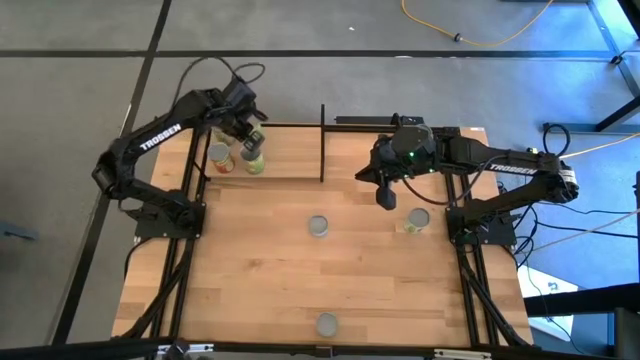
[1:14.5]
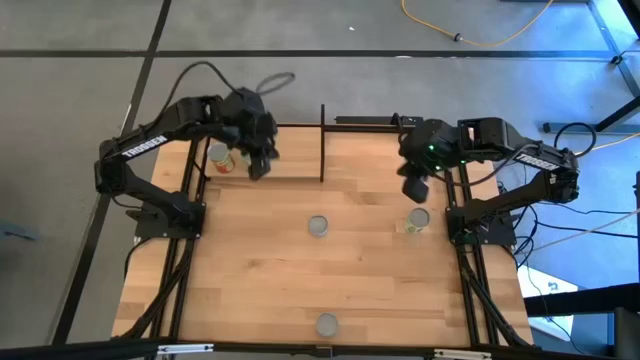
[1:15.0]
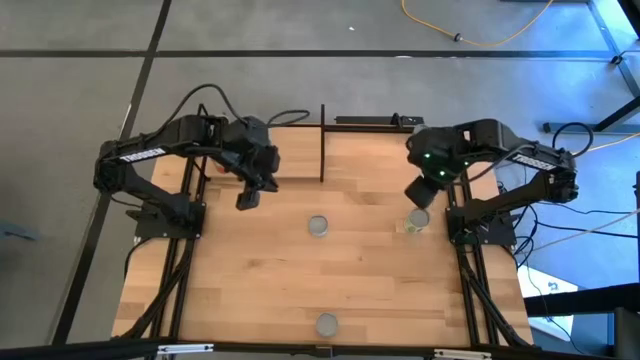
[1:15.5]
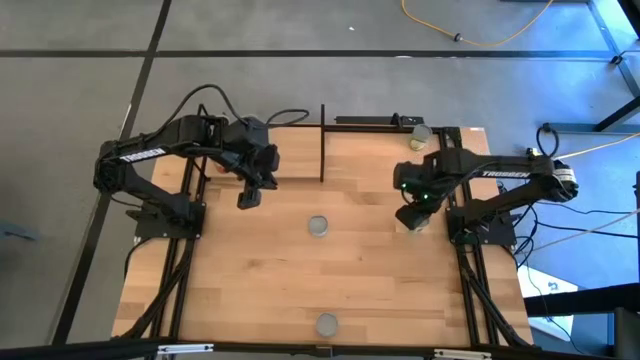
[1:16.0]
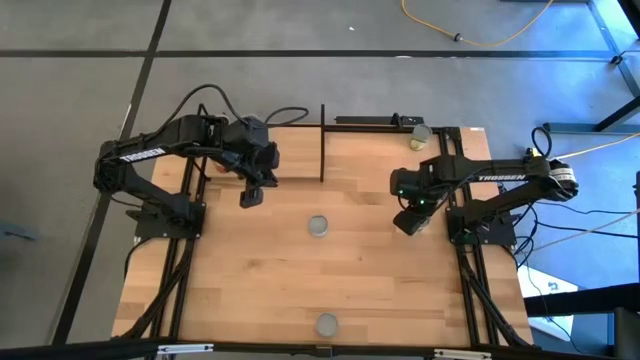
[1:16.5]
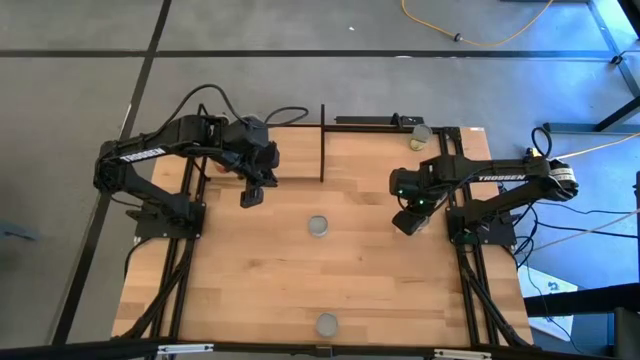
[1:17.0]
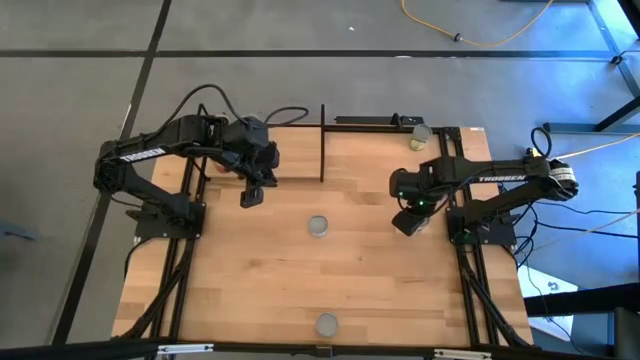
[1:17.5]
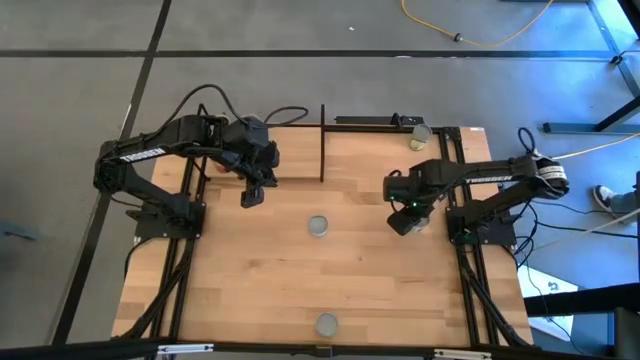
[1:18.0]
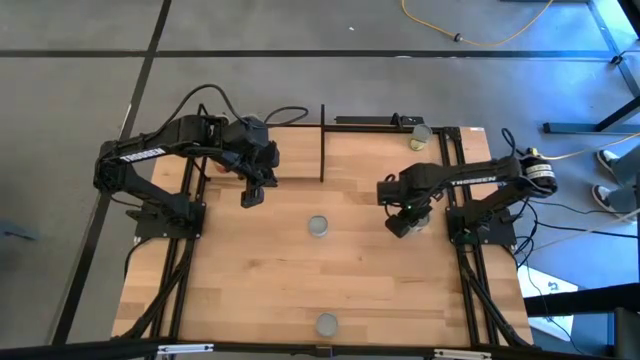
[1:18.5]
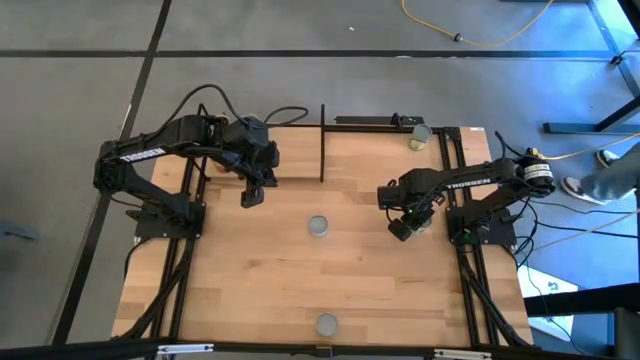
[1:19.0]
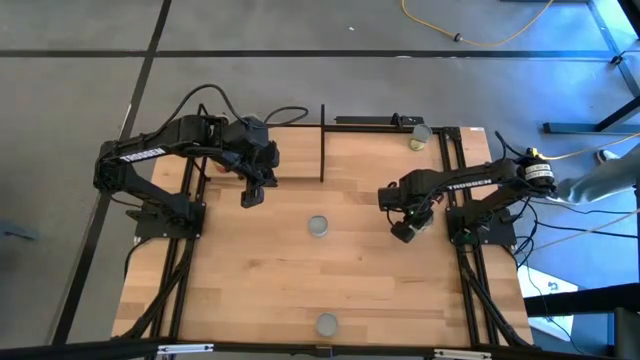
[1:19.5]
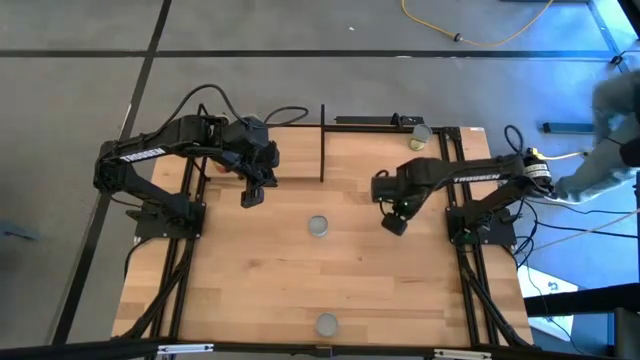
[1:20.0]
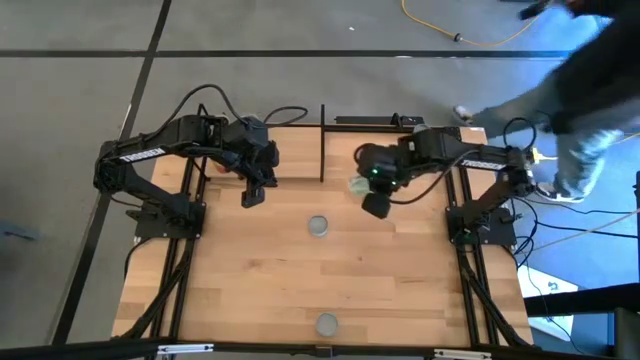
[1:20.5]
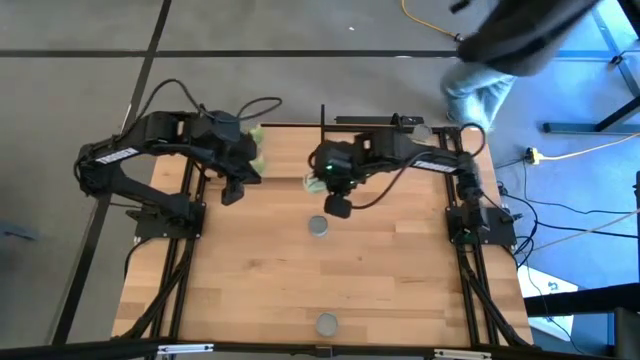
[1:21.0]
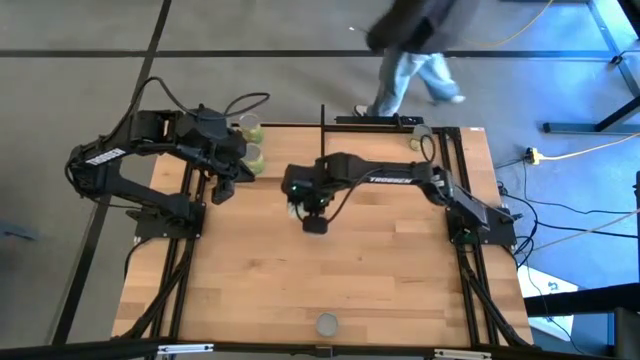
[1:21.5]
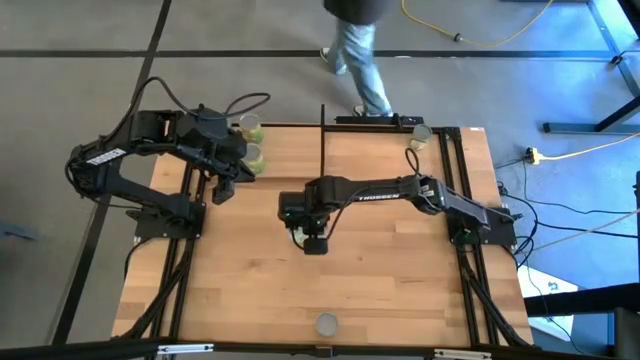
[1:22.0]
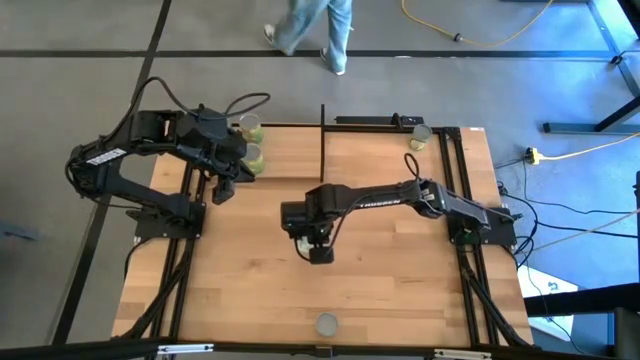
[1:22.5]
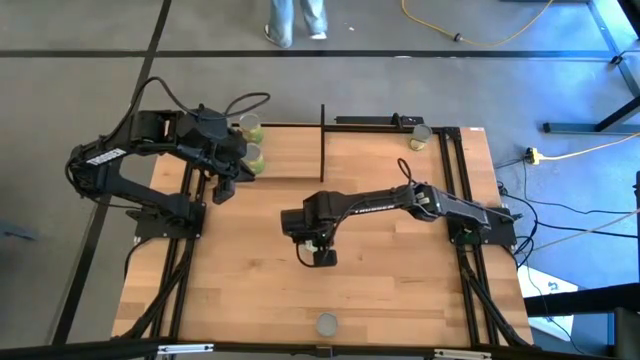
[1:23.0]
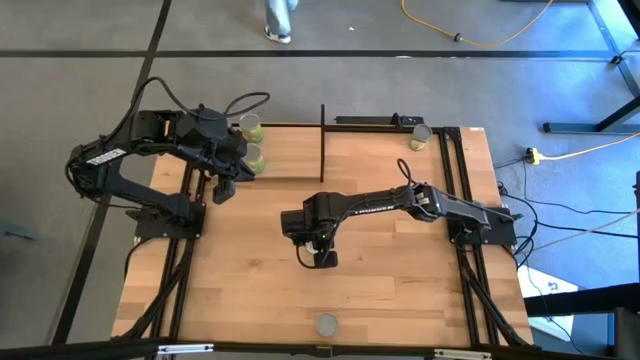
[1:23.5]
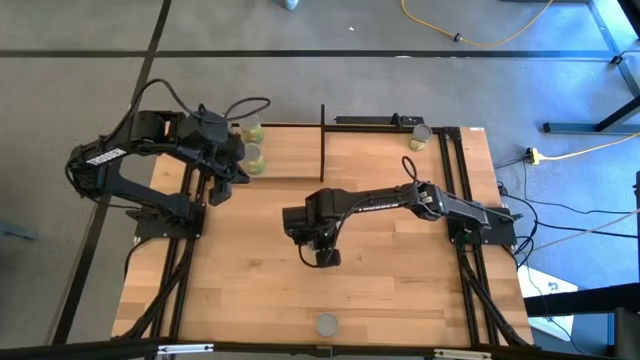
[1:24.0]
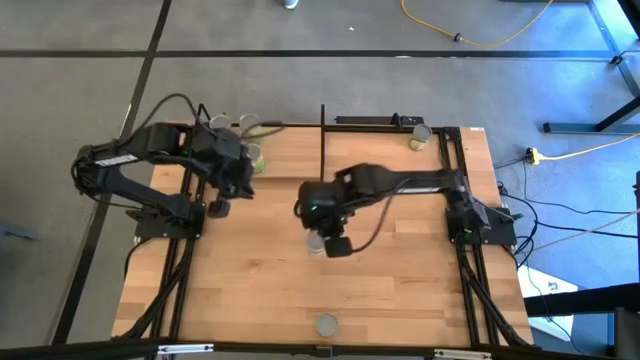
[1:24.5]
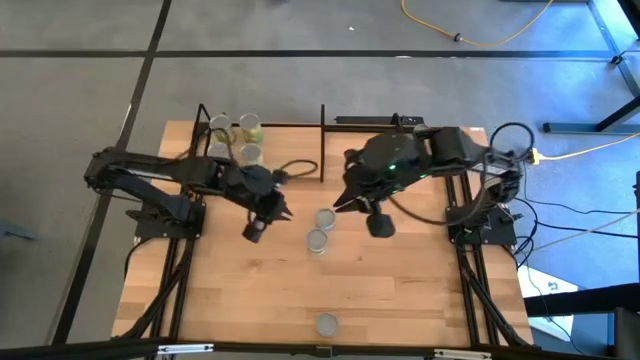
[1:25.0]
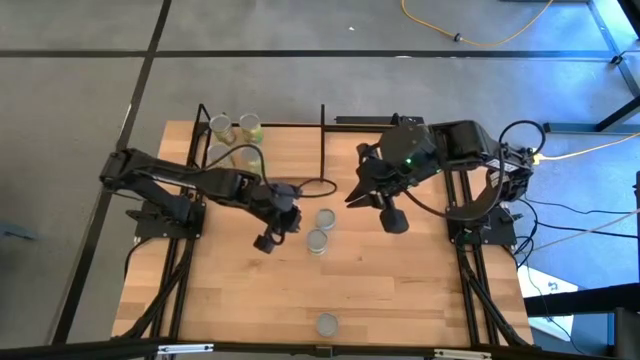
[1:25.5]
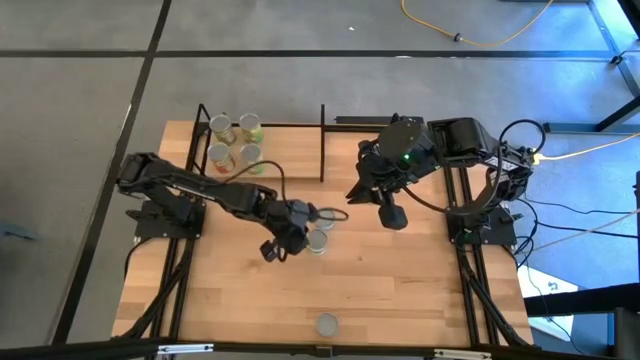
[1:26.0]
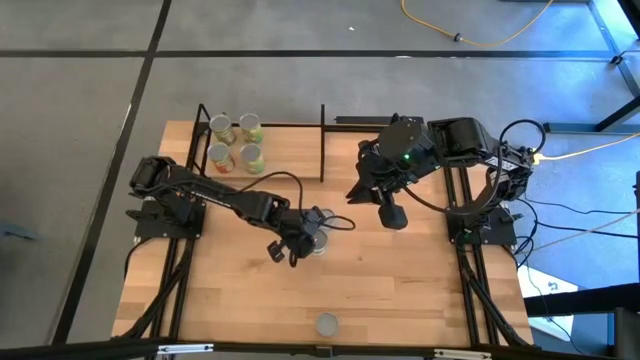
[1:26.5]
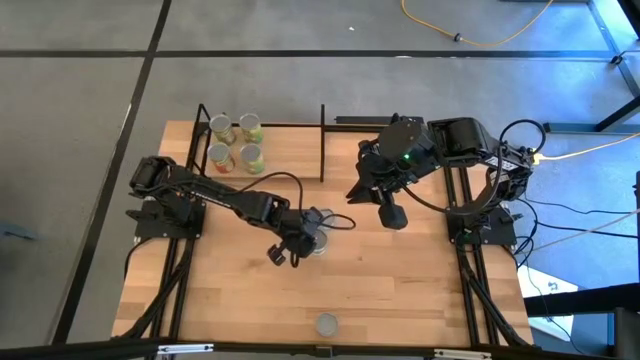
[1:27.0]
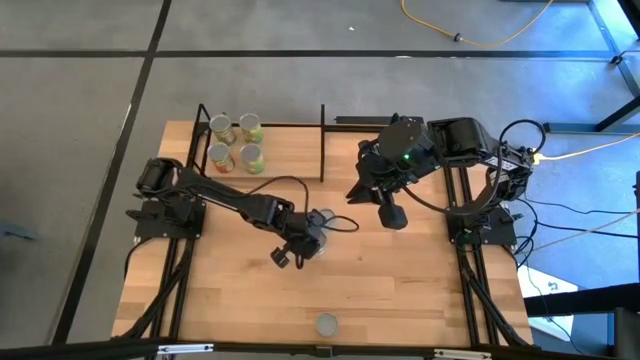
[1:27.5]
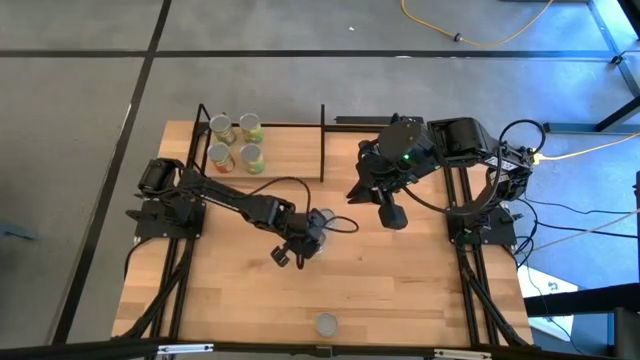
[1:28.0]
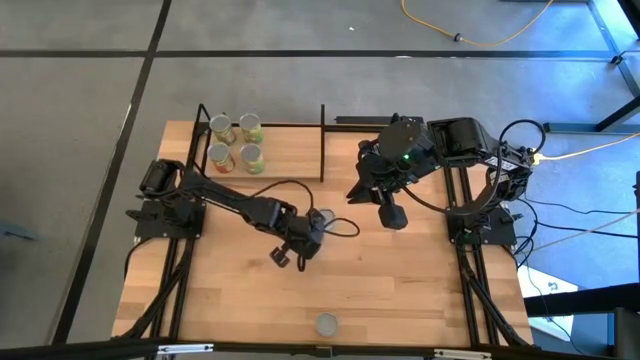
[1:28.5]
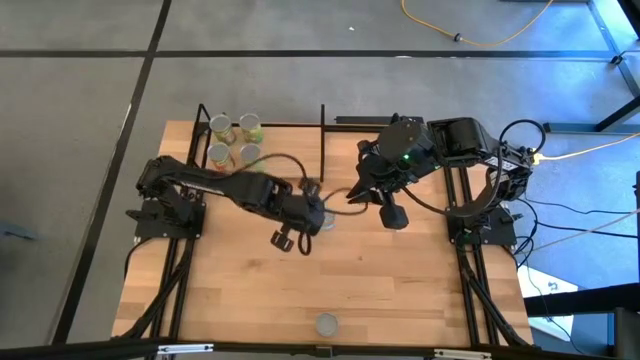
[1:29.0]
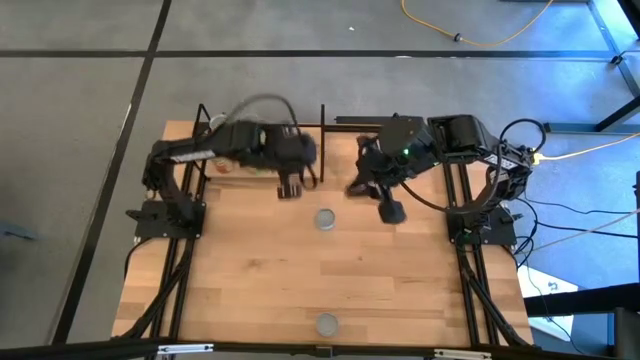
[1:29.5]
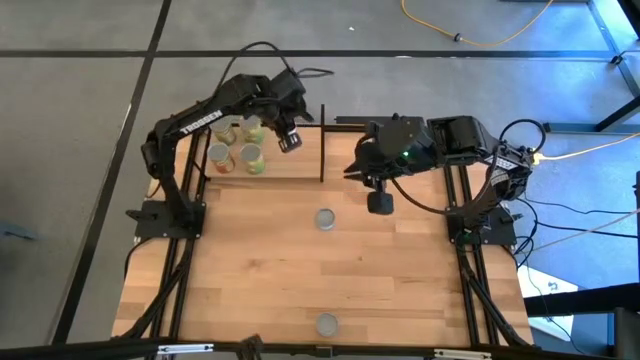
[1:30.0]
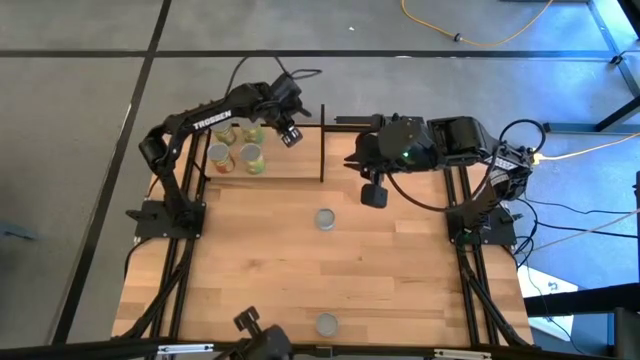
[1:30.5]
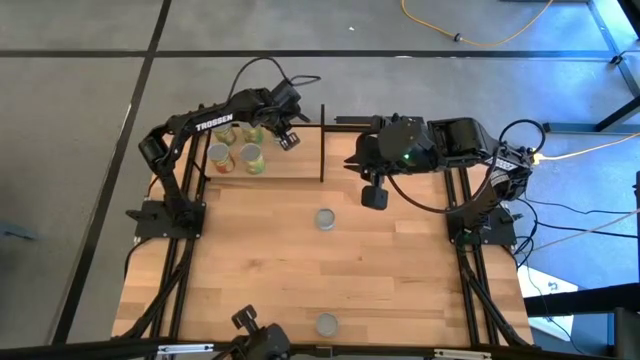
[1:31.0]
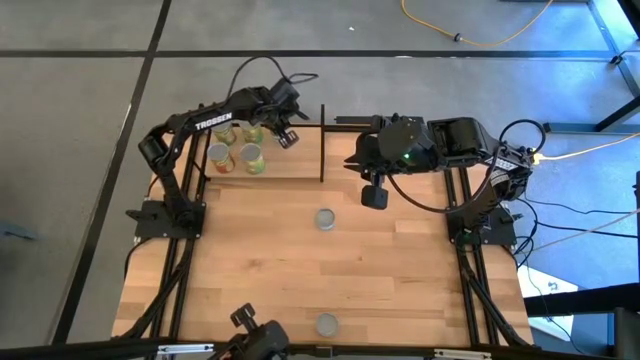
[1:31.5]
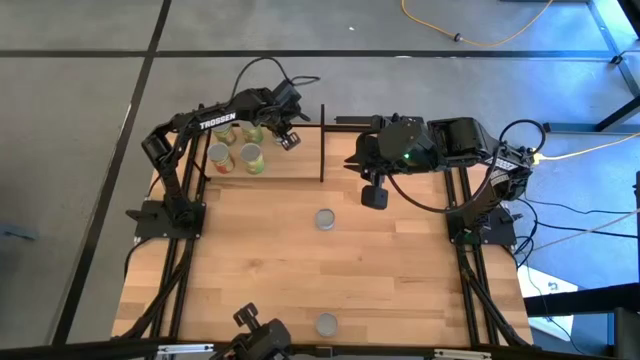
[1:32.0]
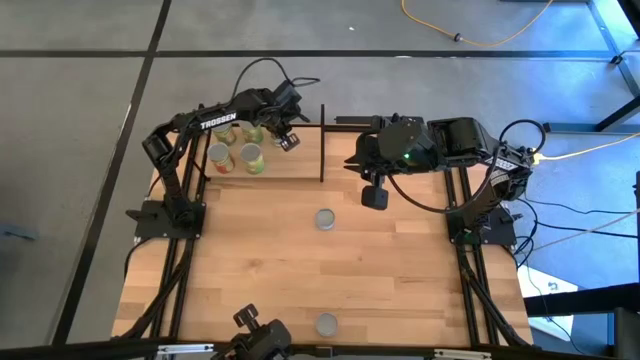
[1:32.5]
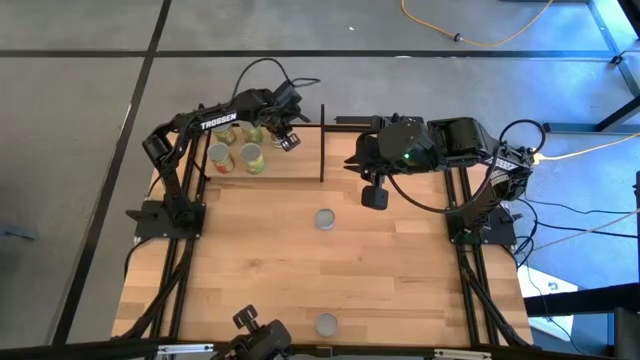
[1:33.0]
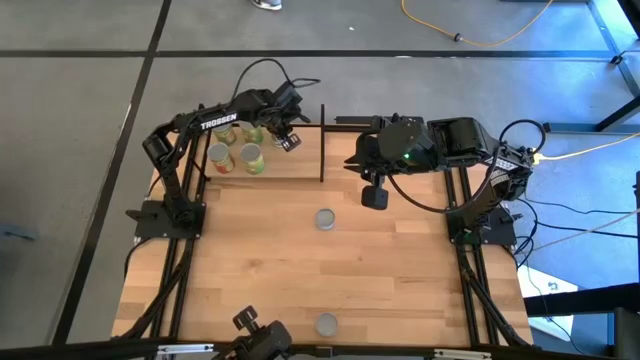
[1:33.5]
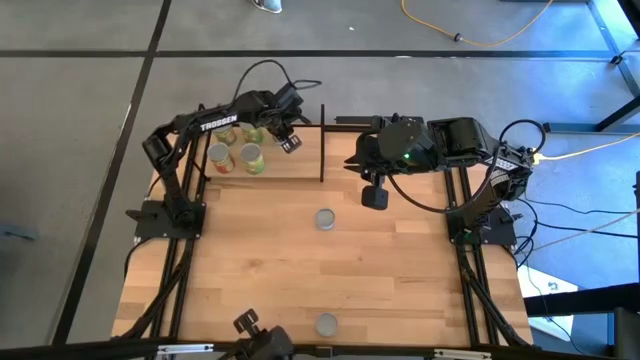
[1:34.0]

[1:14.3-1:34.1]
Task: Pick and place cans onto a shelf
Put the canned mixed vegetables on the shelf
